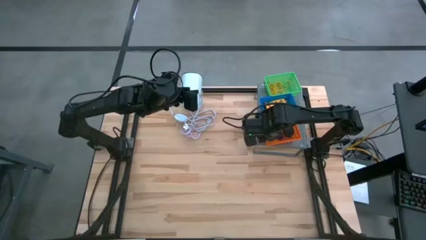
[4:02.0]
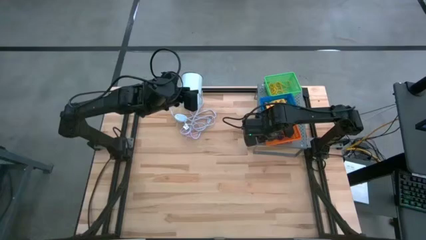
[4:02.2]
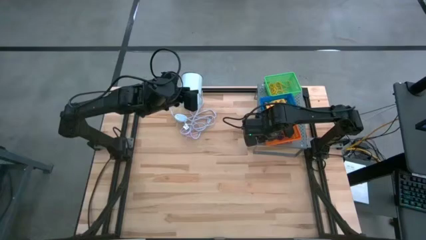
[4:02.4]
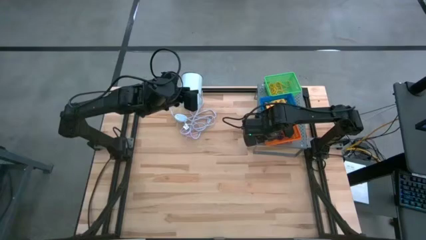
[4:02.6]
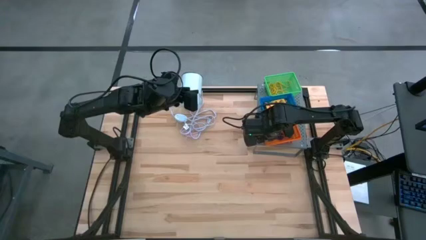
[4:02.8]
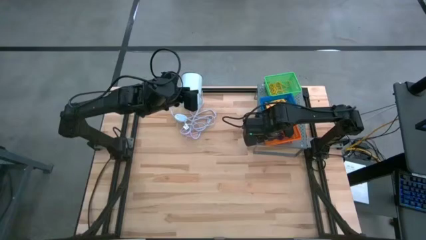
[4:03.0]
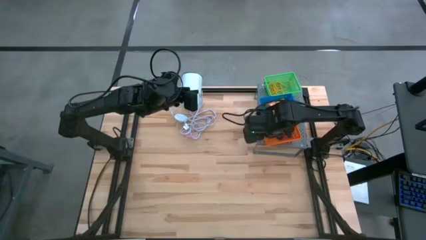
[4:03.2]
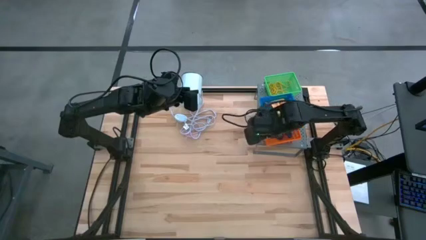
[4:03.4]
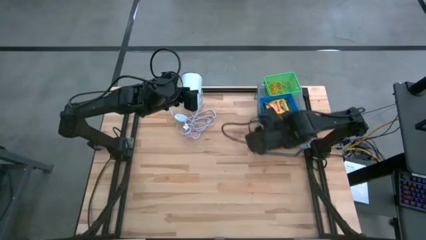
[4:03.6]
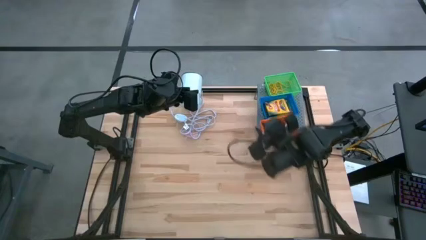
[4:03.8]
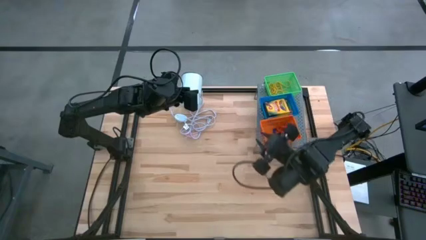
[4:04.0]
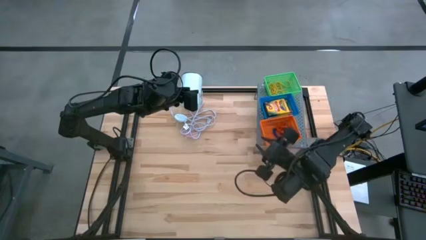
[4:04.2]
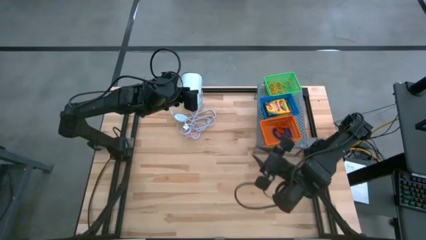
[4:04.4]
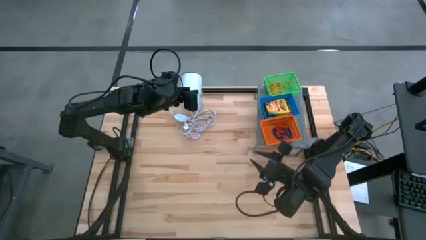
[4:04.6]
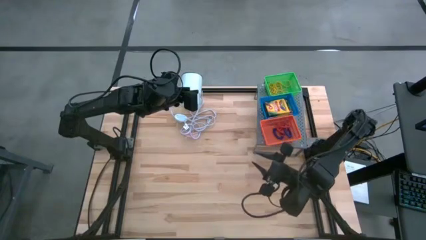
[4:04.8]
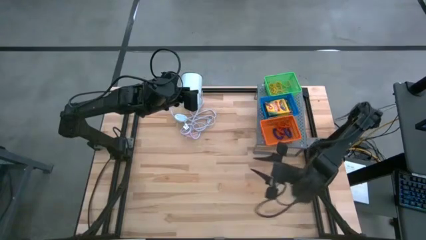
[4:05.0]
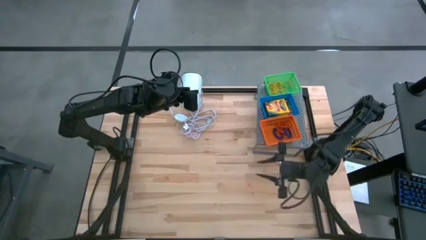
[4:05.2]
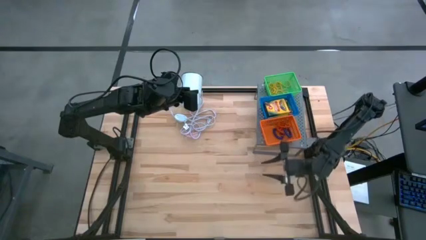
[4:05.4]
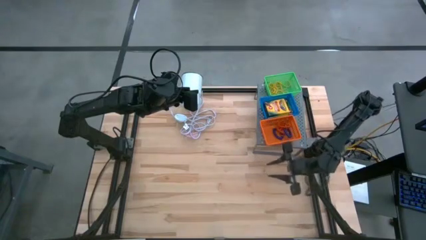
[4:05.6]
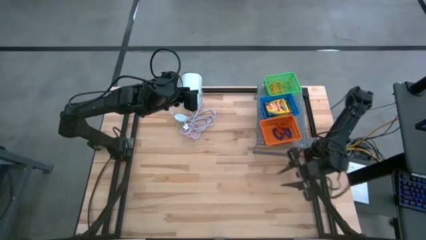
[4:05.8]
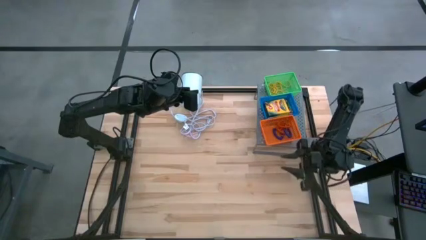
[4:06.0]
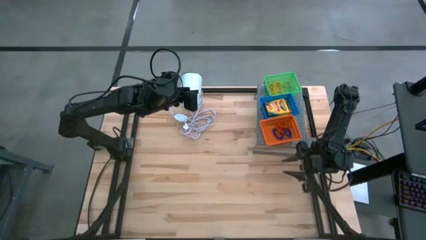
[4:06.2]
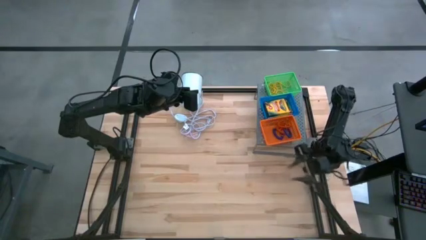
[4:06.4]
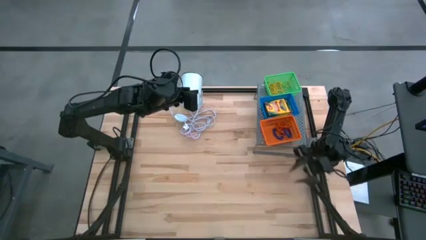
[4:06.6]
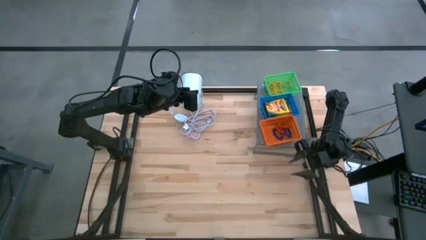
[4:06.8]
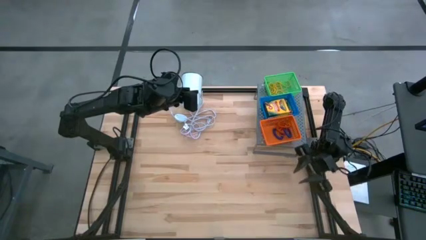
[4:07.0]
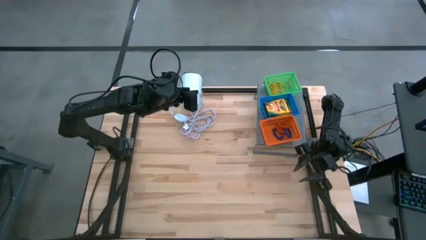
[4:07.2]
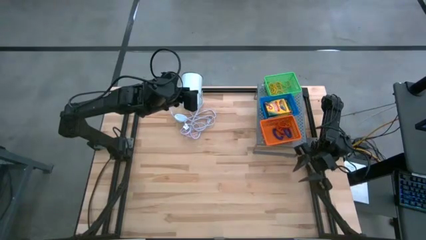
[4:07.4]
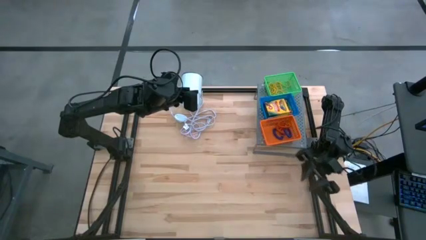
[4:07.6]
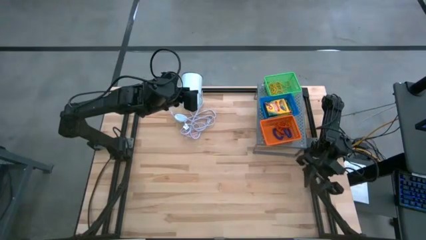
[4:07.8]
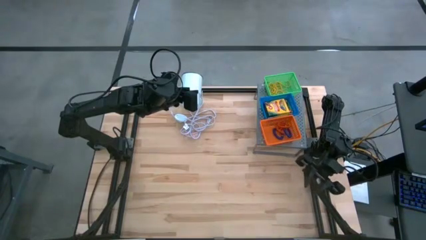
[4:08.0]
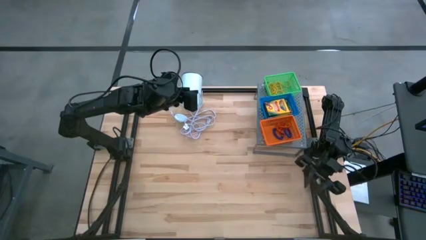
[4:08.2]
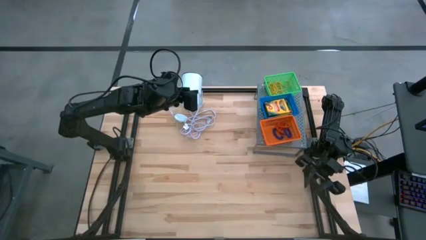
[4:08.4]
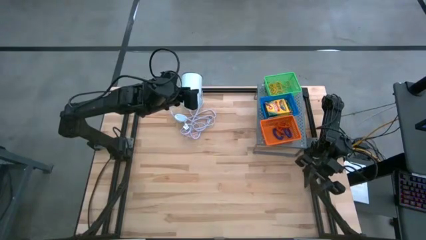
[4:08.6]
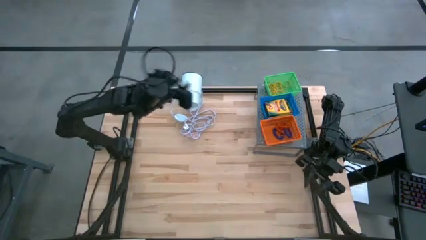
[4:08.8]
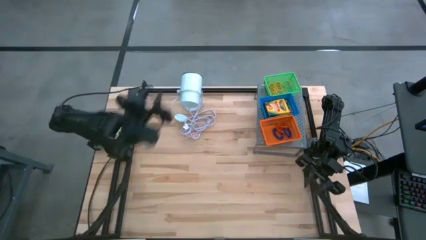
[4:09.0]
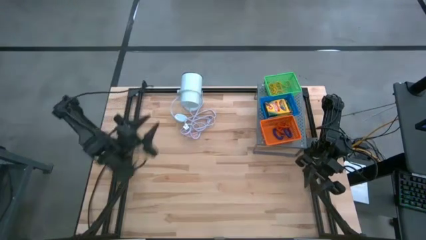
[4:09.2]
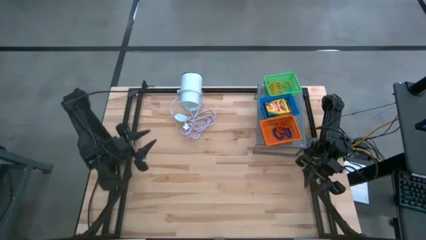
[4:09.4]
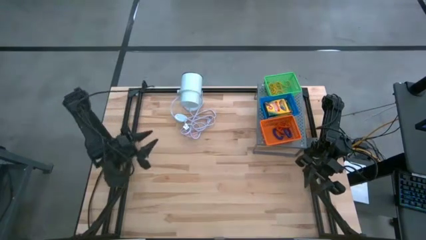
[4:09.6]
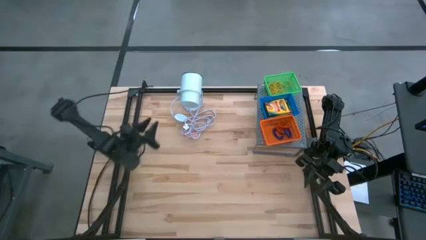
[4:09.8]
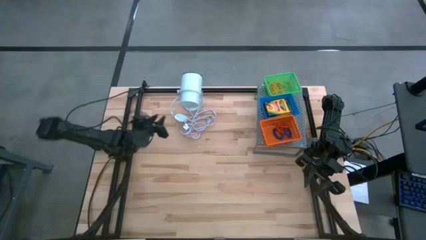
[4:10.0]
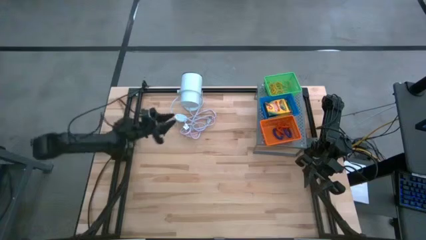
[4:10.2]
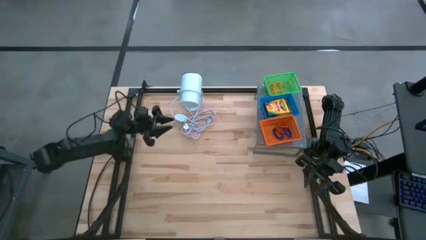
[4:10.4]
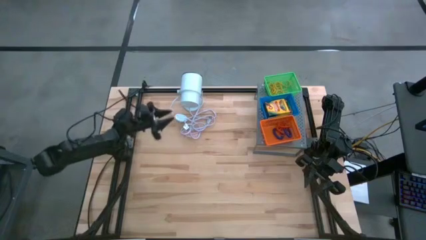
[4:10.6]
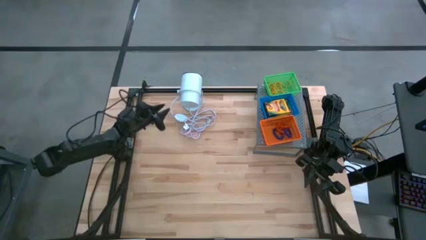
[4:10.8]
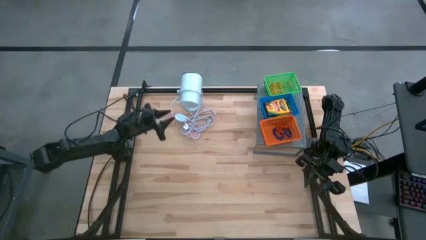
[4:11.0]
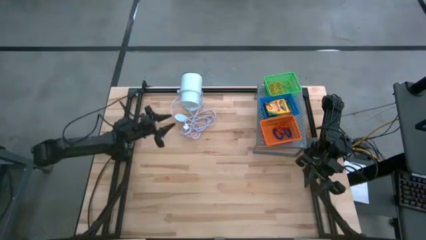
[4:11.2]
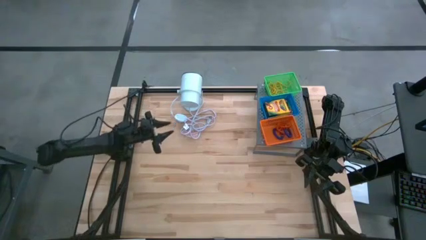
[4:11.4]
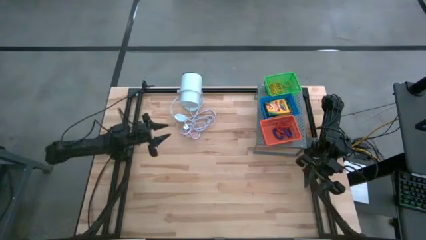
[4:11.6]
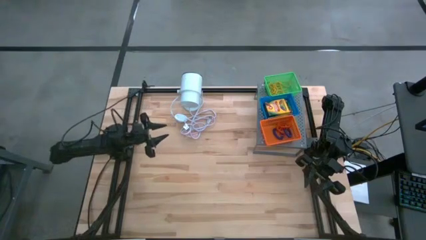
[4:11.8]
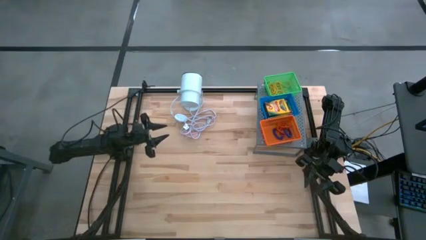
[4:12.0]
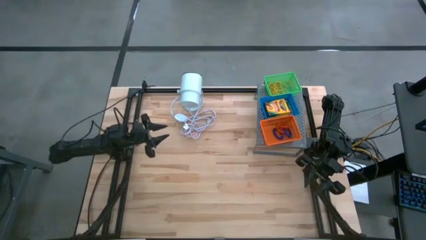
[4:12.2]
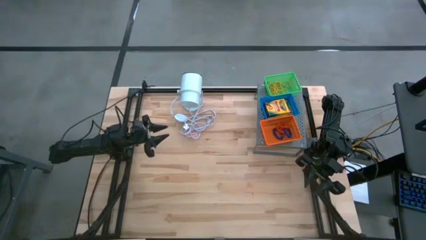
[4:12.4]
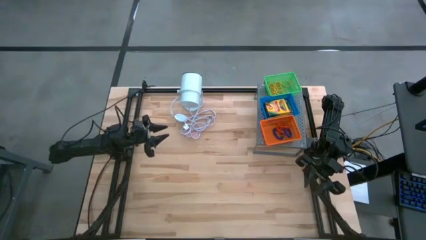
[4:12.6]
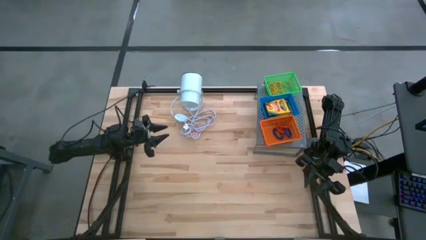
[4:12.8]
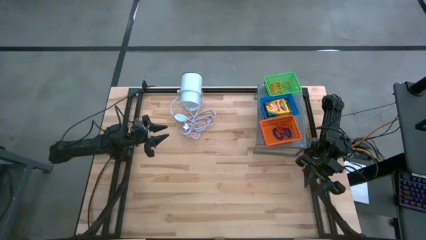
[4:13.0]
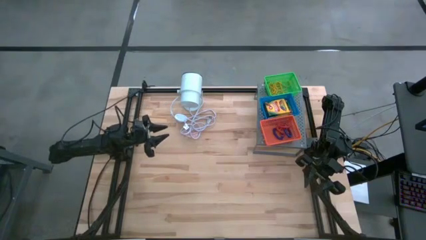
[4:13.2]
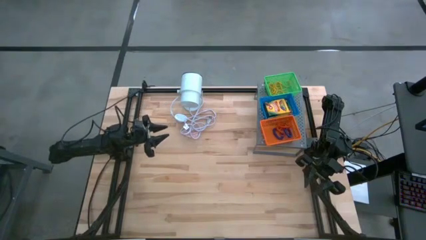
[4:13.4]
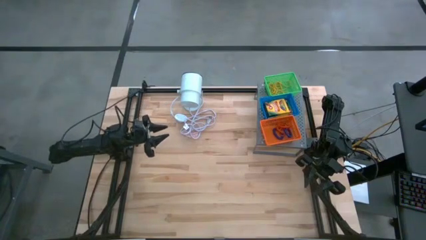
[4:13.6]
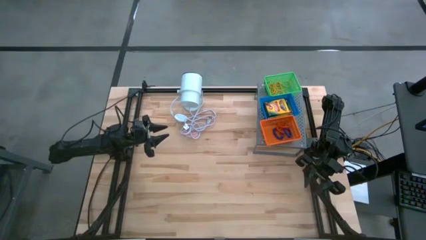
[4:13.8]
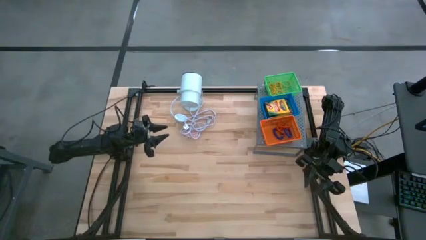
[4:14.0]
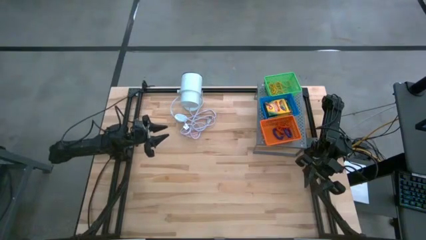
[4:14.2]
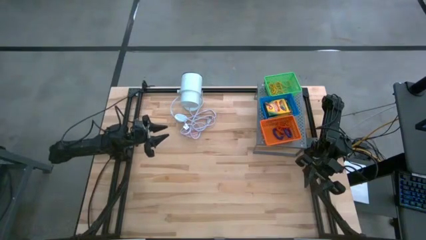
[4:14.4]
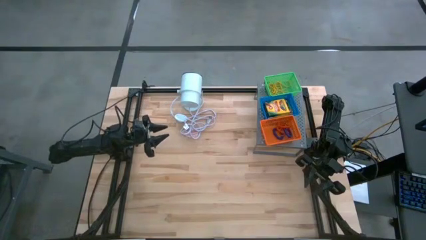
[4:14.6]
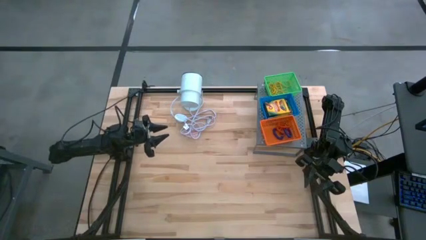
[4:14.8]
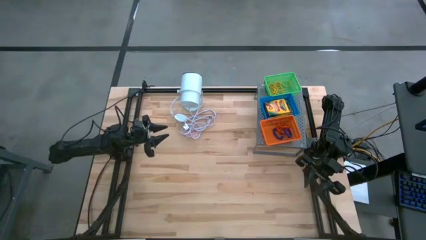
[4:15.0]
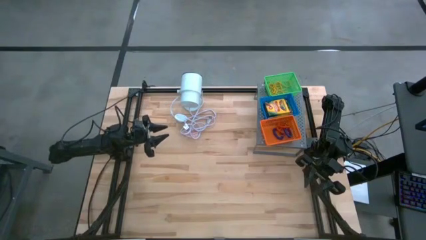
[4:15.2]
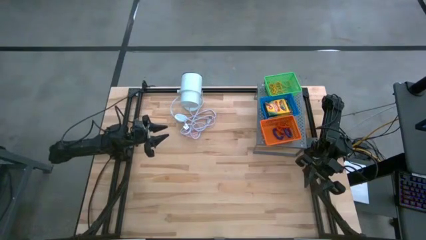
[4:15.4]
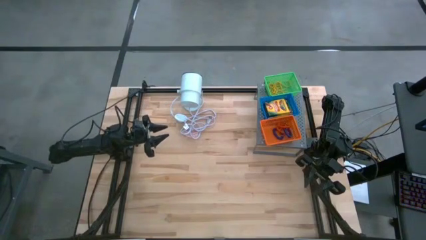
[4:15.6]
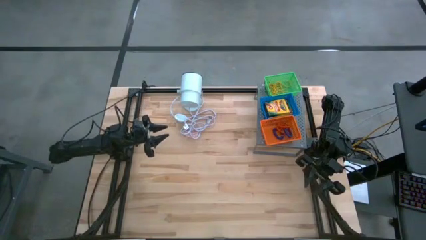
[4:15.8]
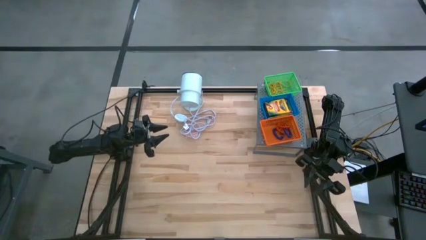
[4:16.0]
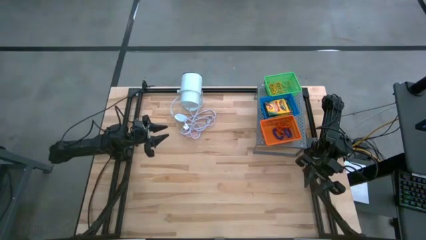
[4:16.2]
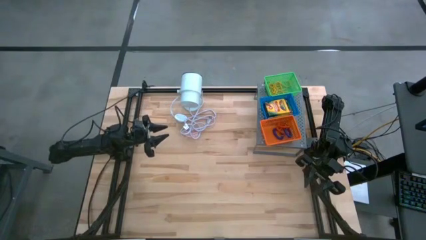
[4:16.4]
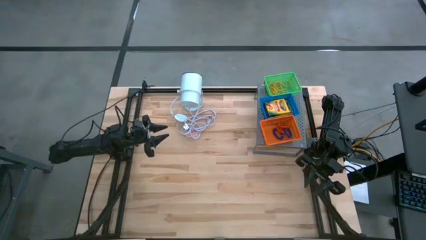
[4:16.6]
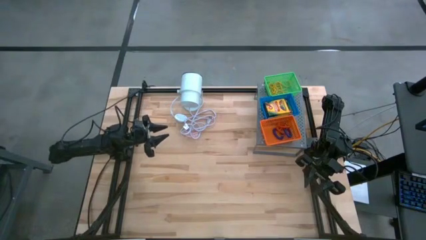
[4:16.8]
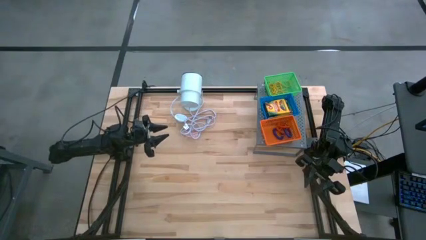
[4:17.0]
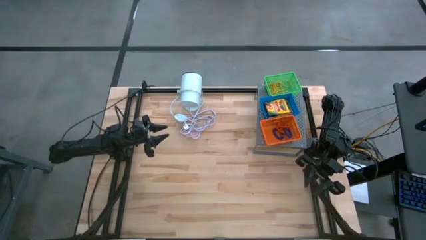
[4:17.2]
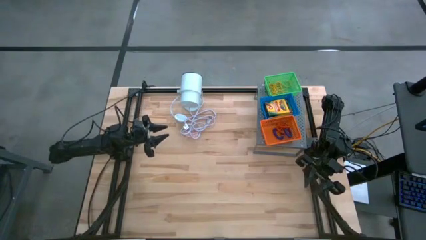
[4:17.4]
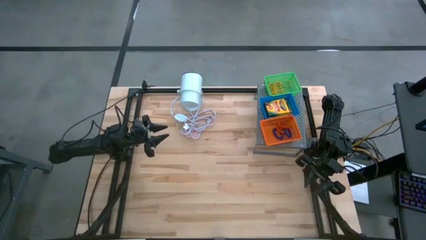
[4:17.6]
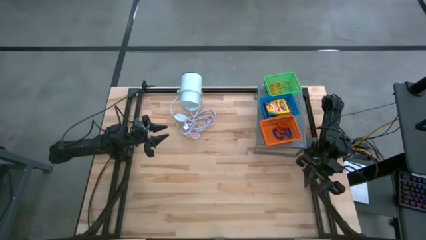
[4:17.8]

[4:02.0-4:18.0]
Task: Pick & Place Office Desk Supplies
Return to Home Position
